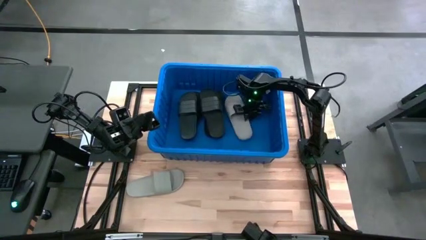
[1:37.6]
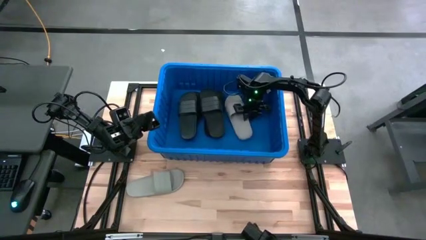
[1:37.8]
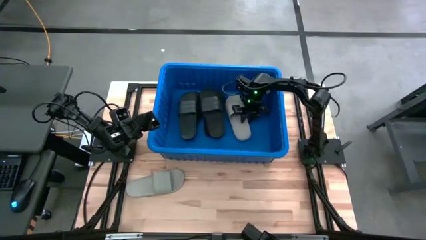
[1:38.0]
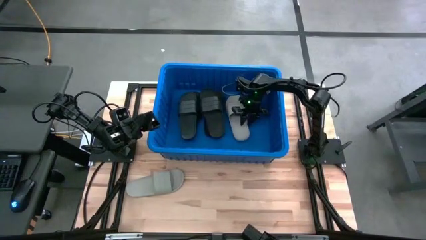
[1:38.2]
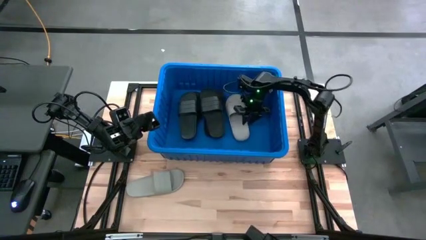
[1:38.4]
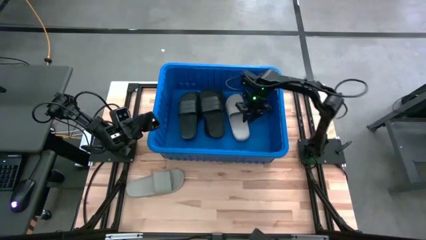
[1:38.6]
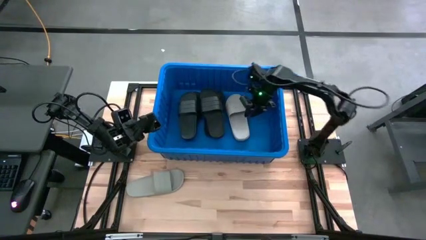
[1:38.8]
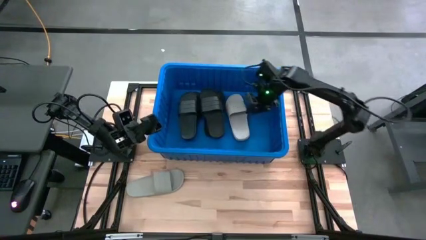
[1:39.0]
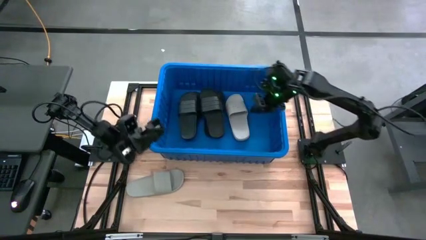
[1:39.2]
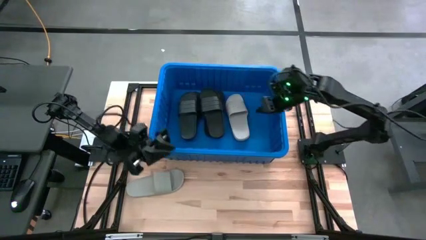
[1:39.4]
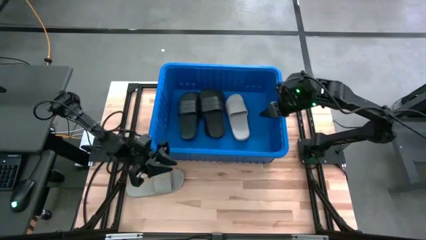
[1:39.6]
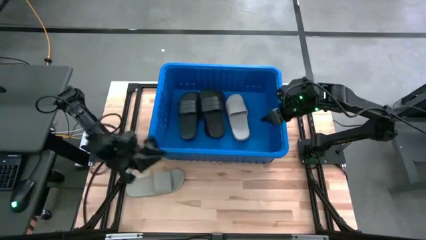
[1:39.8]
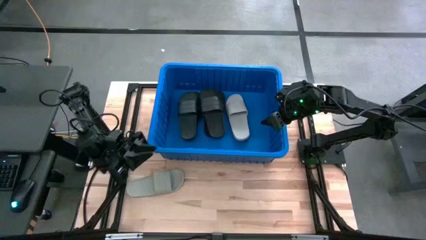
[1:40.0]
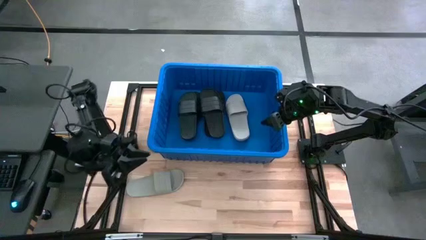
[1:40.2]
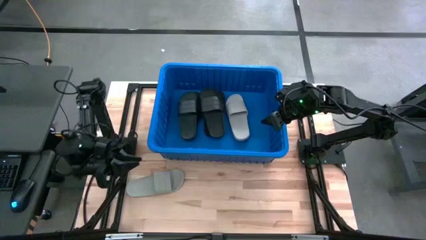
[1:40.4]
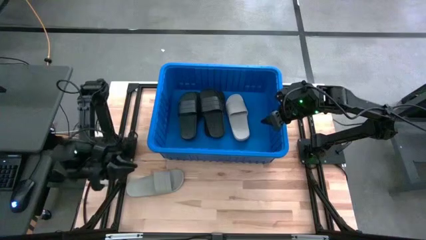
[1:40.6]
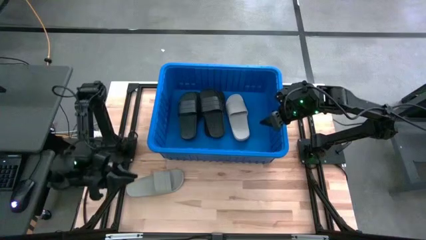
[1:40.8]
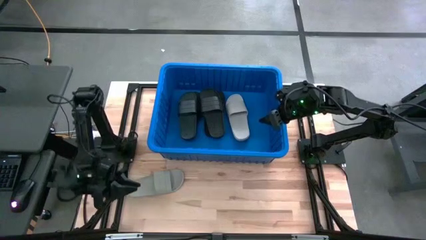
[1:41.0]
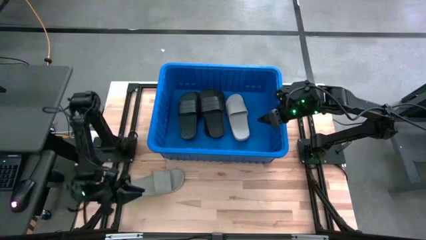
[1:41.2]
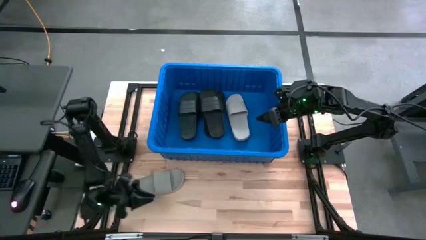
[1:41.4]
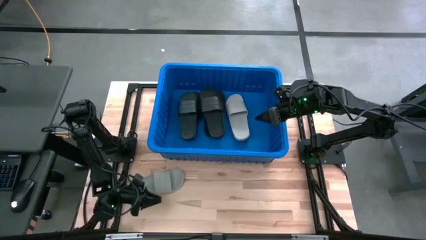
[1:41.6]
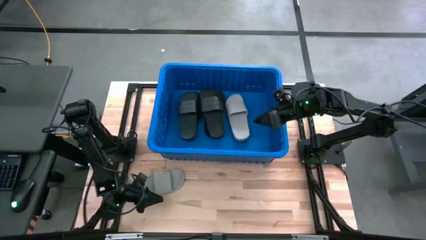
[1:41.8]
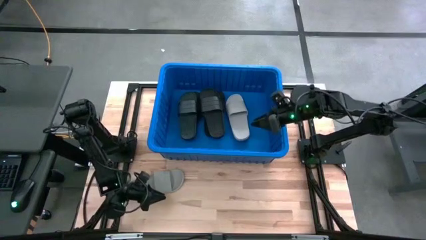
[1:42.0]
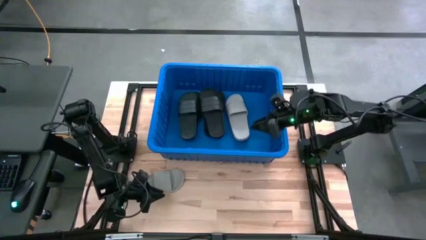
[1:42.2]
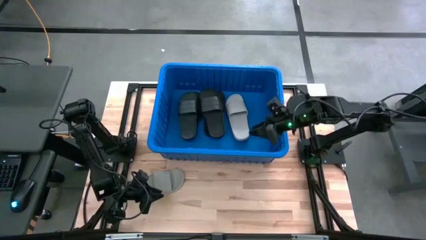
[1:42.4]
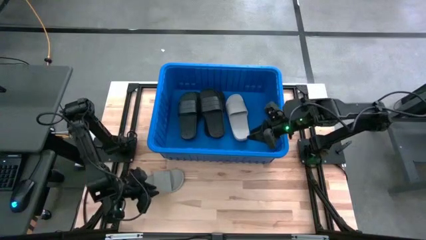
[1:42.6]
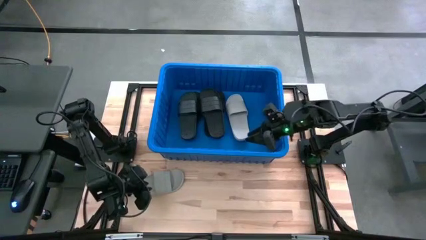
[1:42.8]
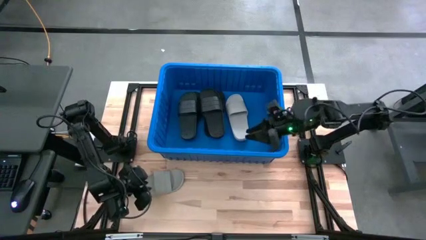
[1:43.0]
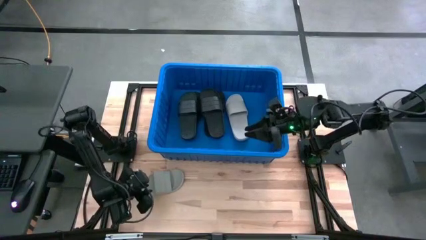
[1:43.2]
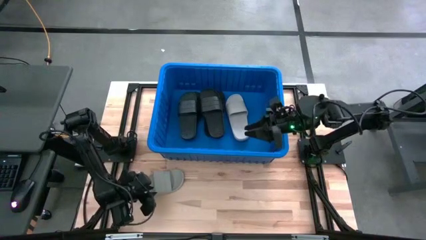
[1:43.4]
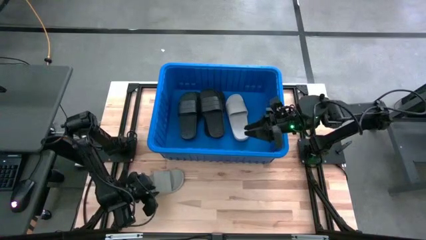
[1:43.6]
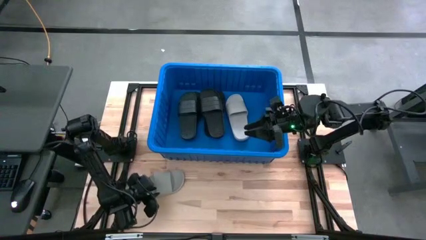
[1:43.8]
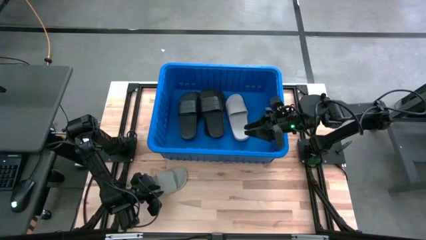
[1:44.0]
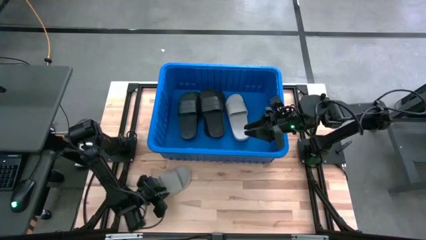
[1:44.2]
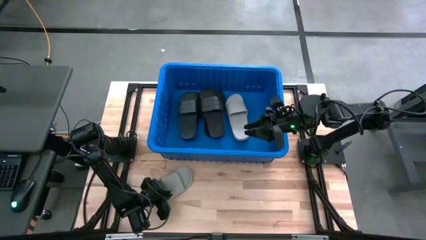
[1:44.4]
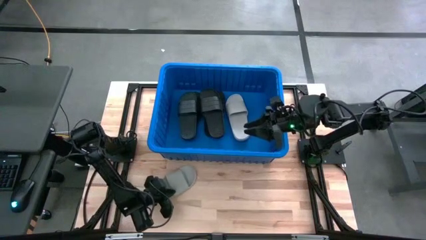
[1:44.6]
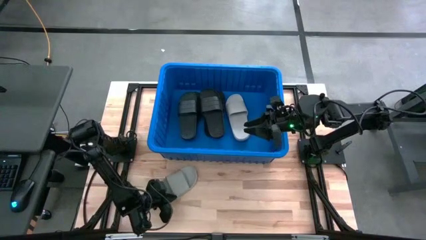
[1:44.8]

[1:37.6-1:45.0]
Task: Pick and place slides into bin
Put the gray slide into the blue bin

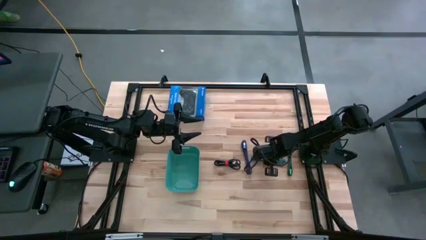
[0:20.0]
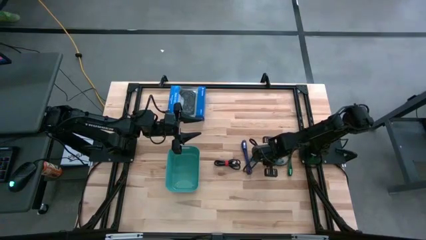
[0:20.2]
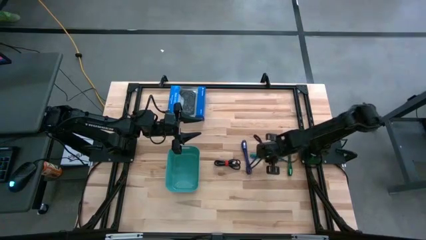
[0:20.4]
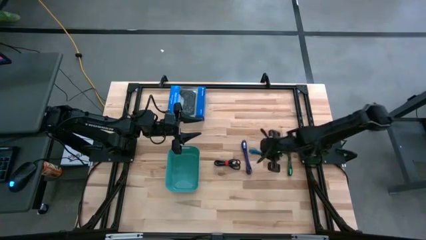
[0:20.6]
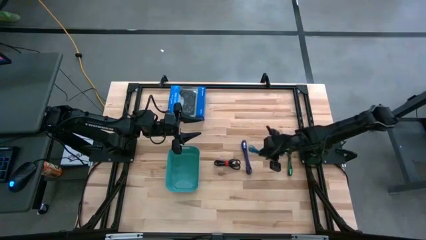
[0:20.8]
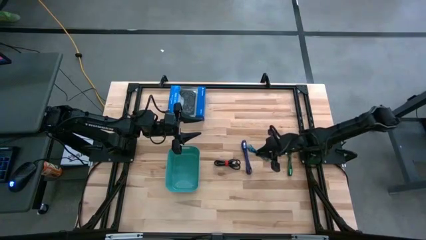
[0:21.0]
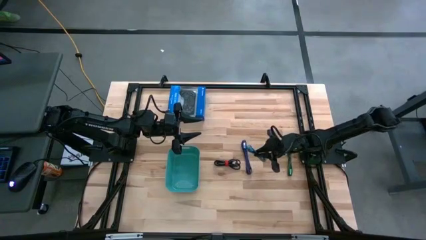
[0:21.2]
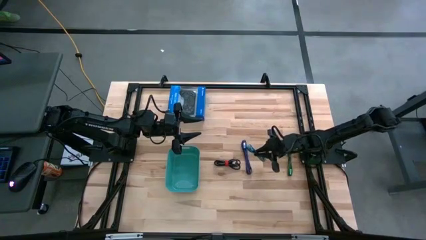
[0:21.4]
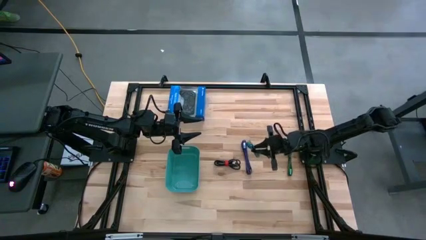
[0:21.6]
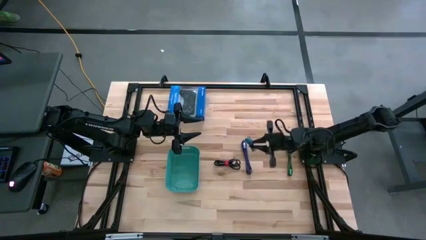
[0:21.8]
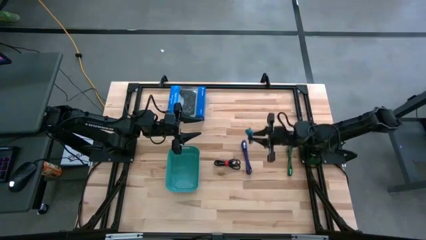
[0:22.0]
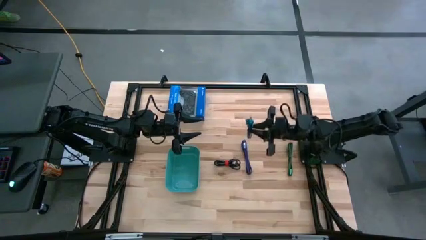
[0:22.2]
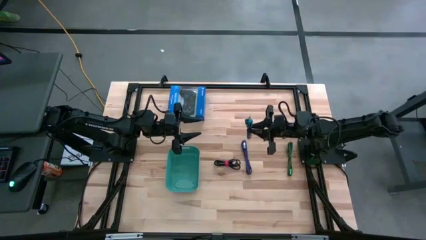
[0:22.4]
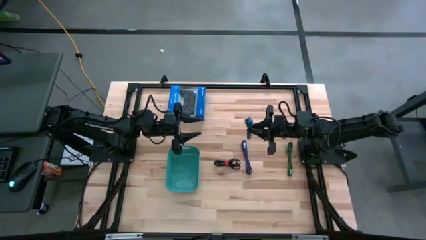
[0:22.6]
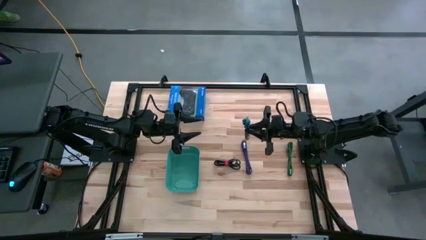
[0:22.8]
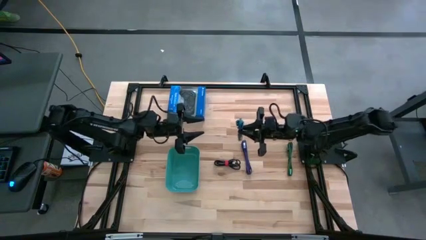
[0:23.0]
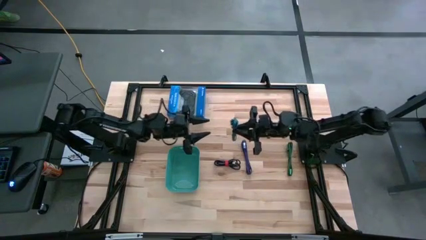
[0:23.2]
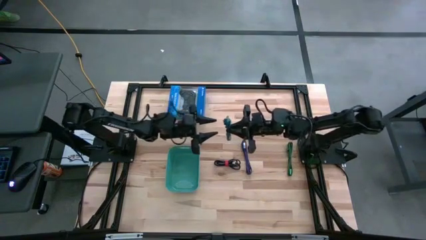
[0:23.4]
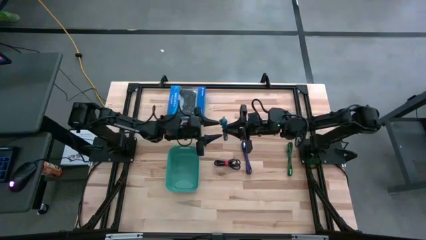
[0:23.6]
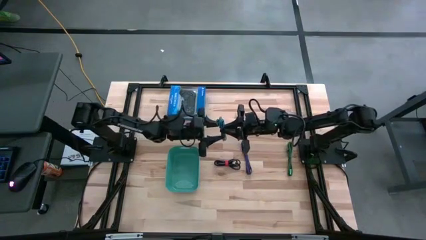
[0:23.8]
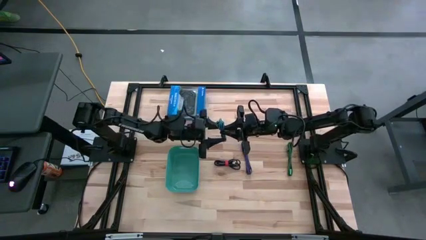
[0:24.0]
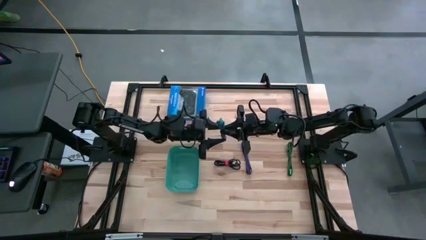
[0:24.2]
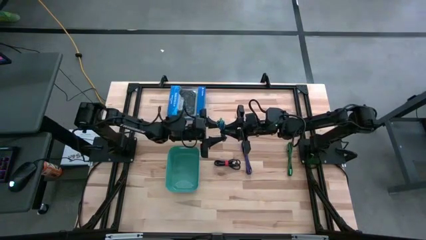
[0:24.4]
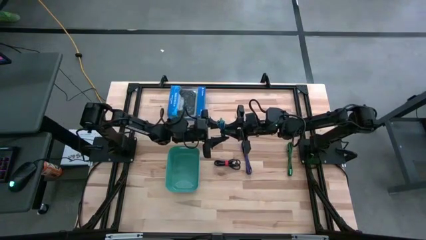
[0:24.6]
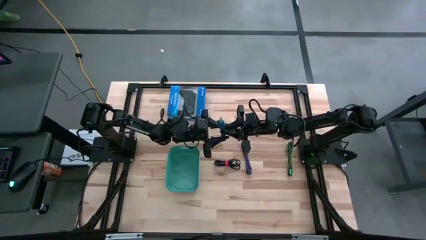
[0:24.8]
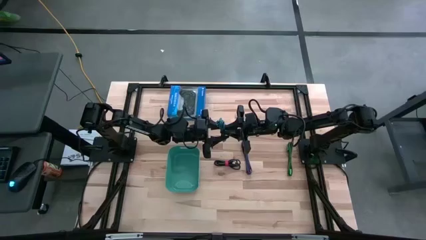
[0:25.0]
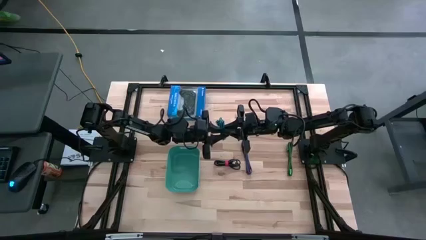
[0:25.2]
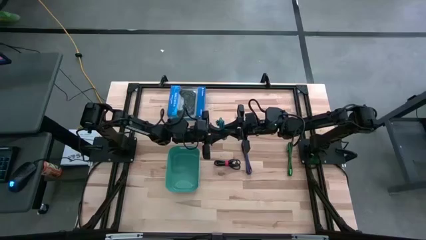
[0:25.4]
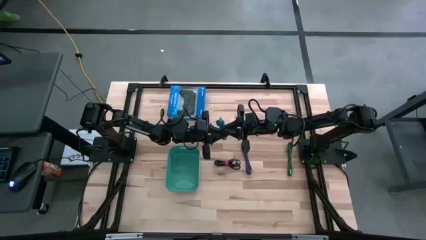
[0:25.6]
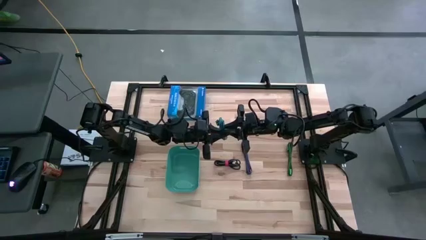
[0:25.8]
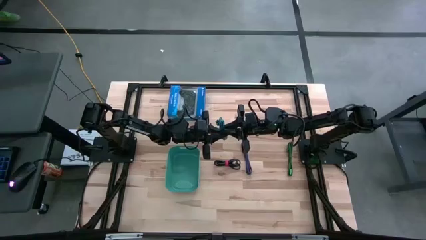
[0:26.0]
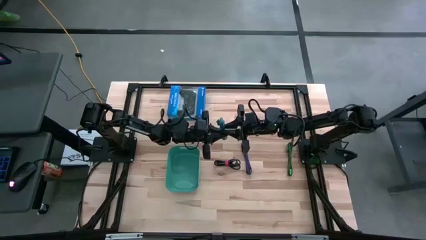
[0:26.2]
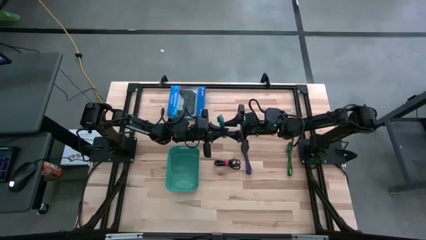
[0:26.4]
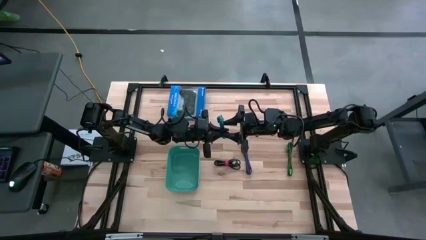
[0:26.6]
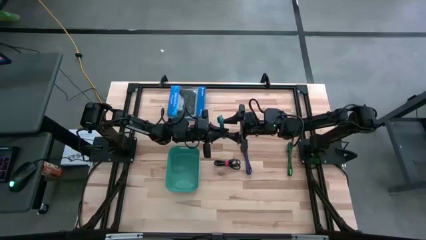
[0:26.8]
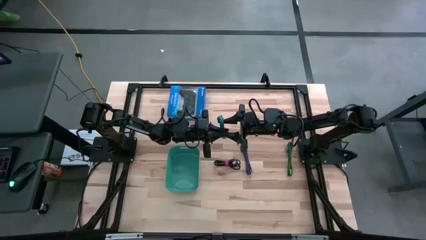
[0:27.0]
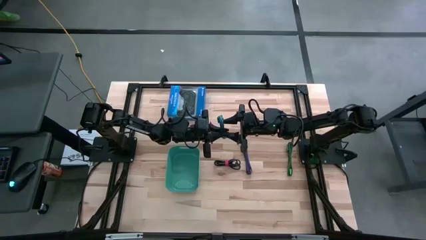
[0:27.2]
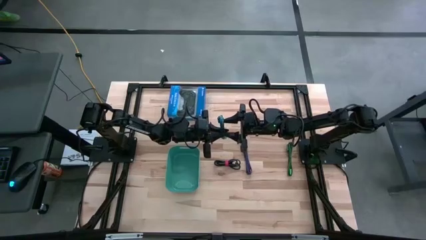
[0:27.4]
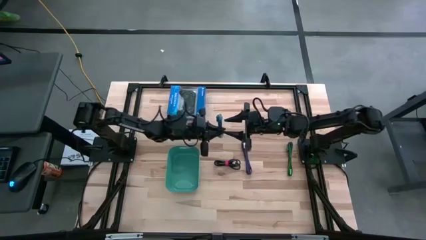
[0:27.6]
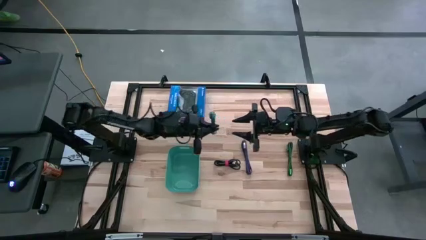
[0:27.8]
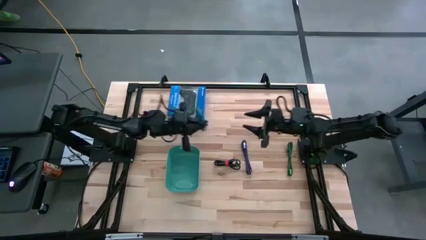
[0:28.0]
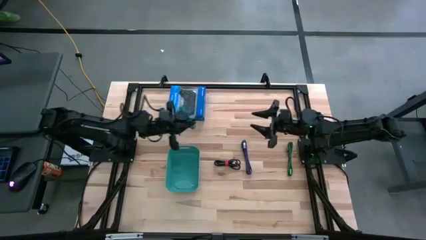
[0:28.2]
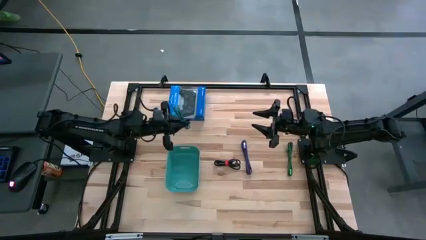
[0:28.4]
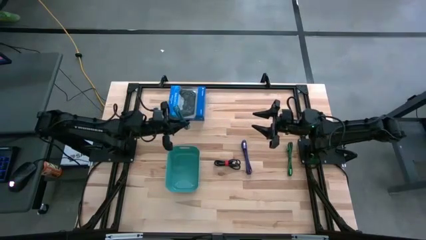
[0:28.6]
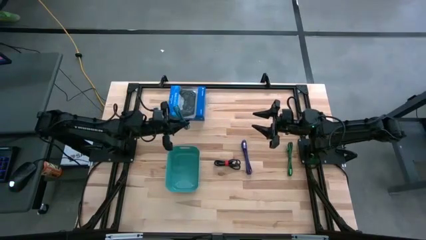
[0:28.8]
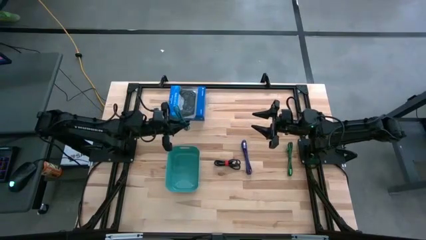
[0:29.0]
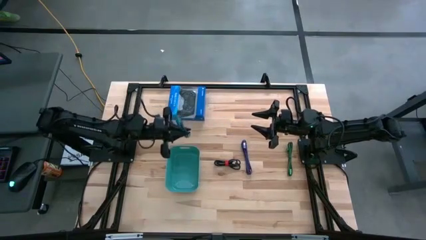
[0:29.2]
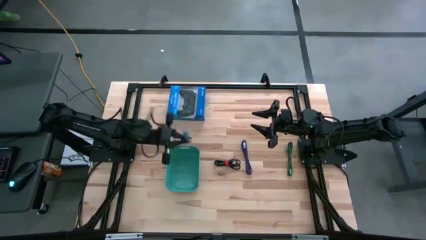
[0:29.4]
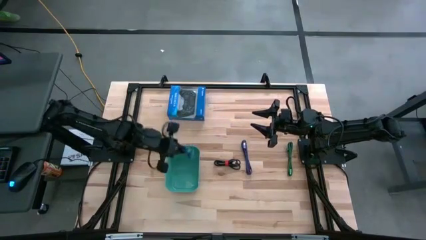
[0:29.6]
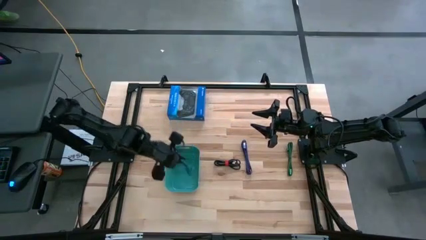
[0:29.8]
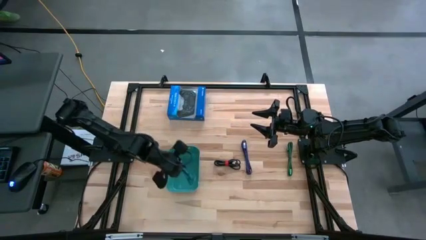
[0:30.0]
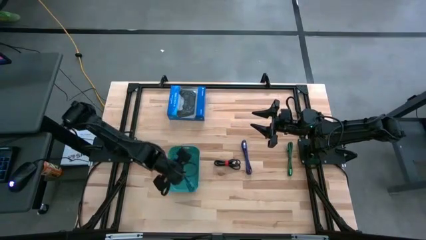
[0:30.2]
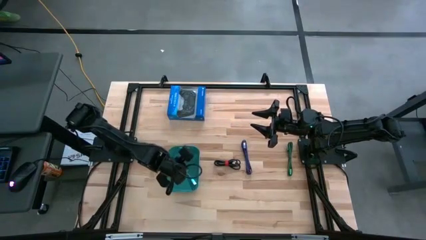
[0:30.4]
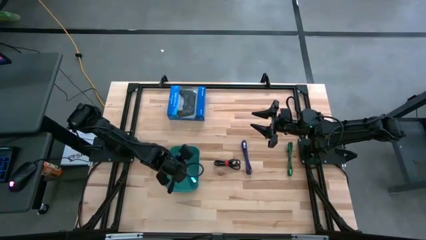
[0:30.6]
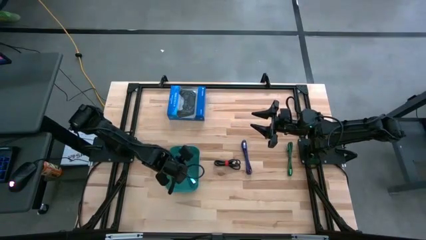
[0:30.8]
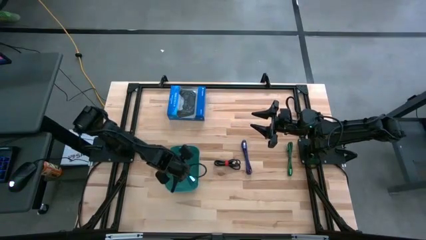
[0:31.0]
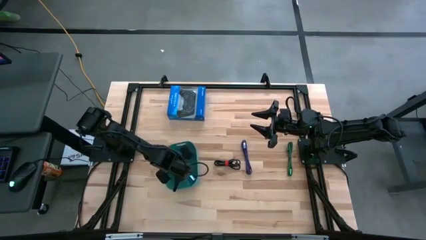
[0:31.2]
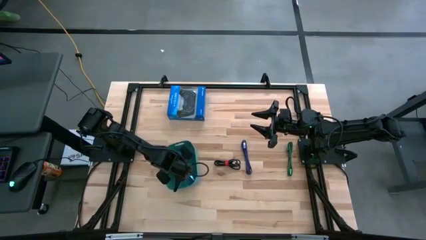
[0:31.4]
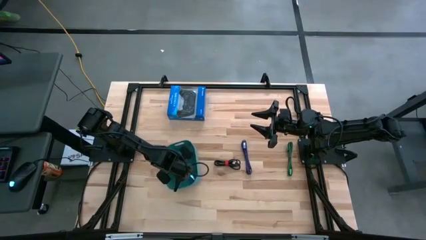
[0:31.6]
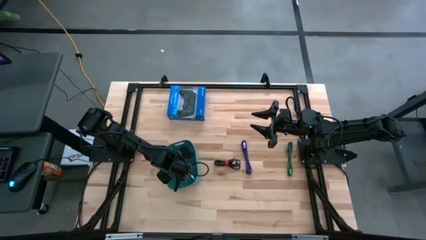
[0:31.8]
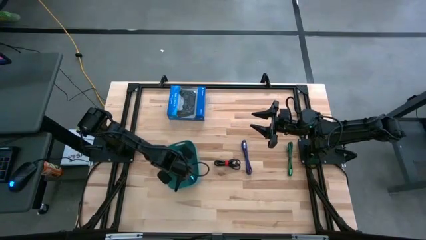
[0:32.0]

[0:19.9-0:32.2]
Task: Pick and place USB-C Cables
Put the blue charger cable into the green bin
